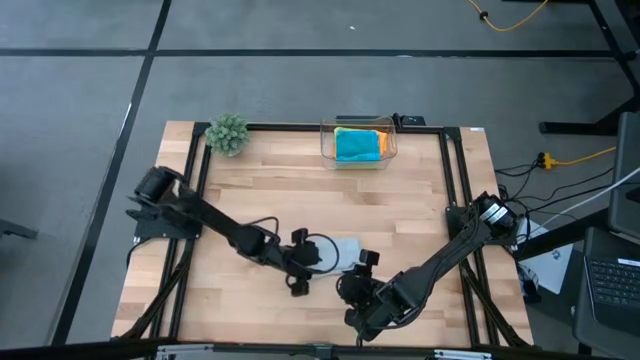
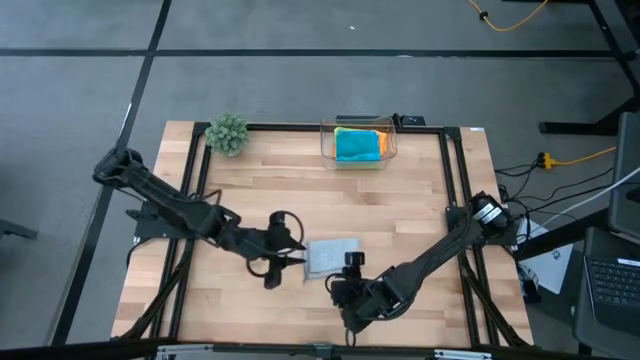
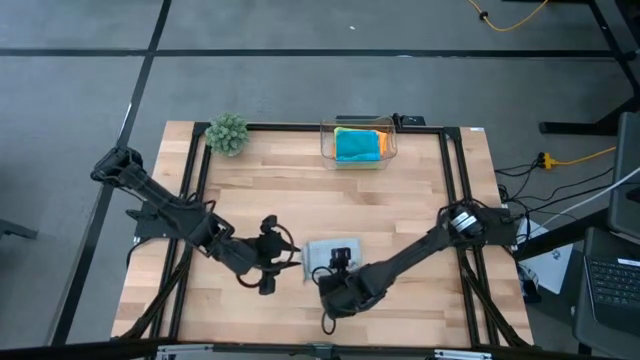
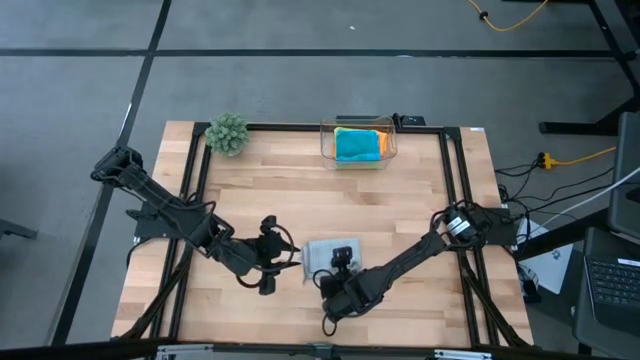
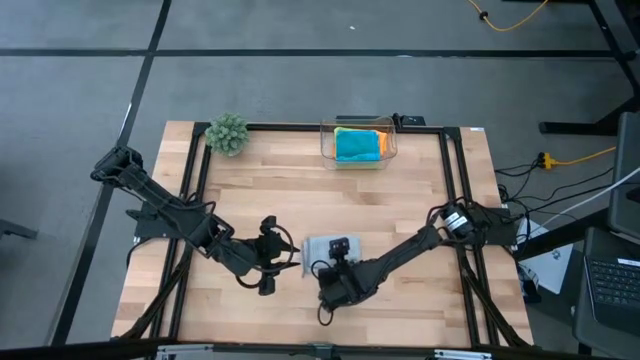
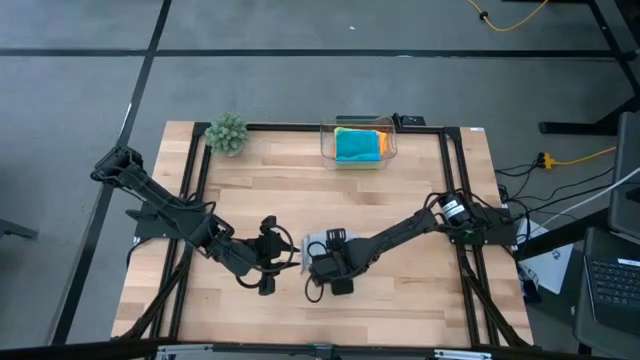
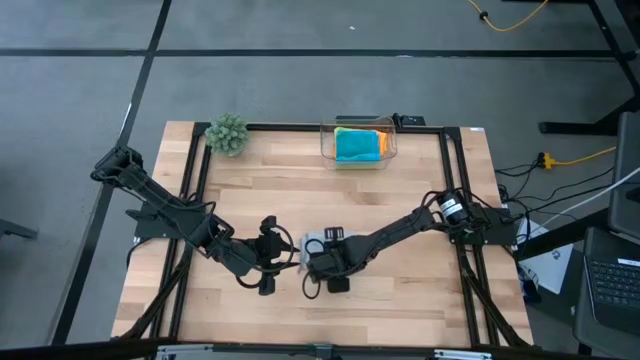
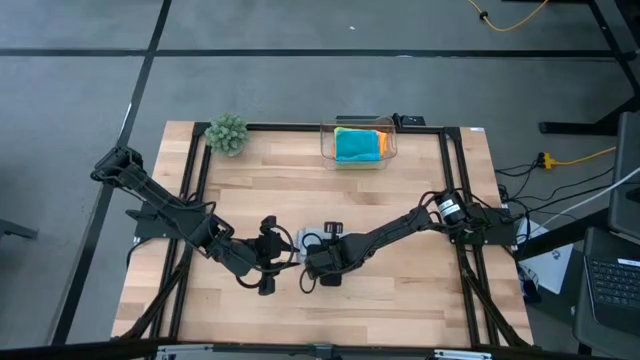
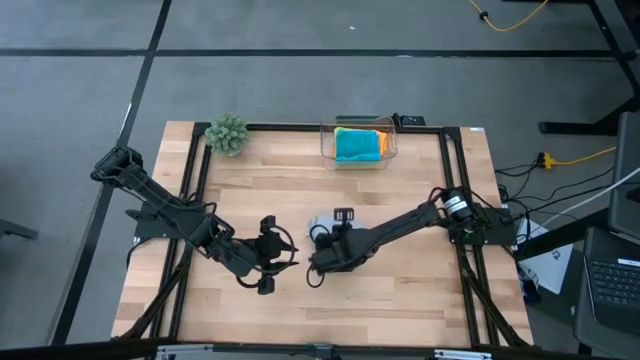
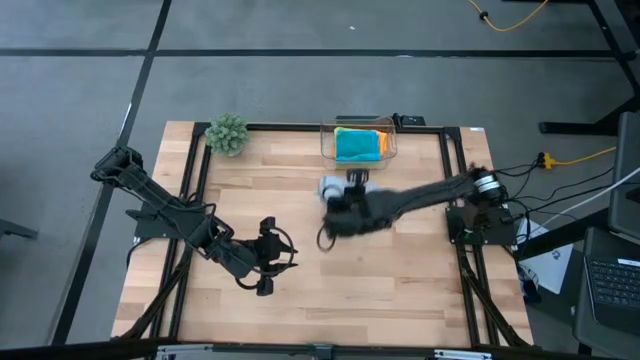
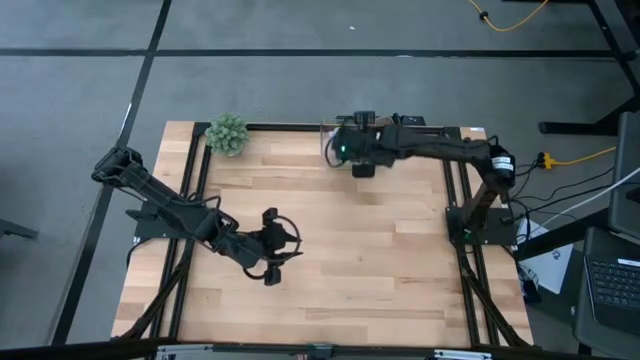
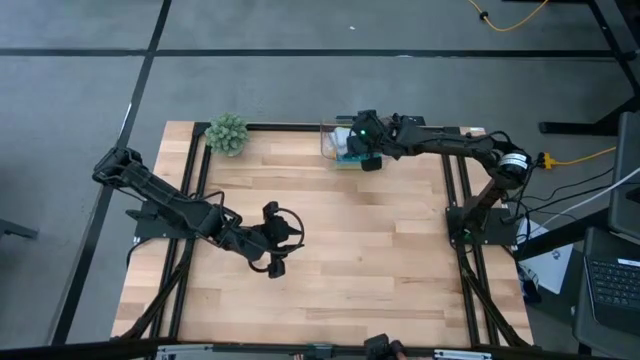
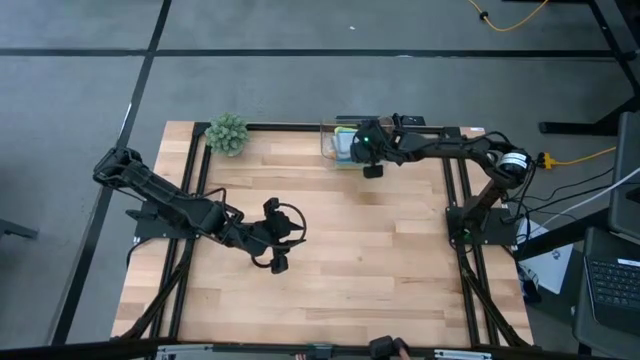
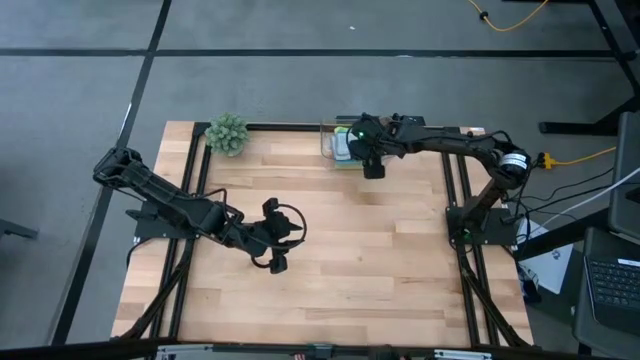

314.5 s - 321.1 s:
Task: Fold microfiber towels
Put the gray microfiber cloth into the transparent bin

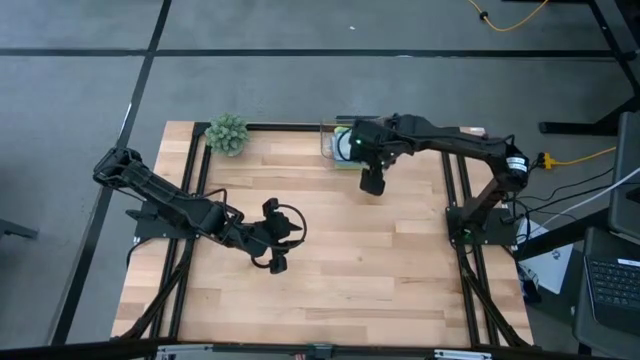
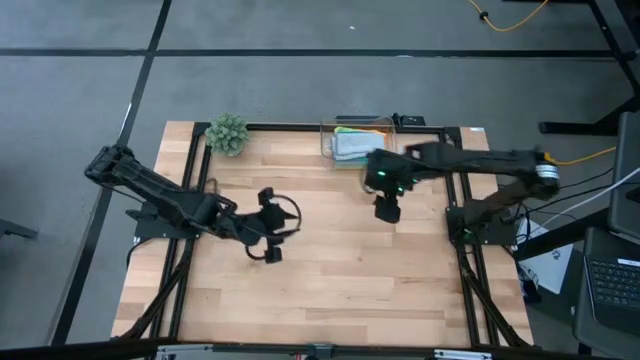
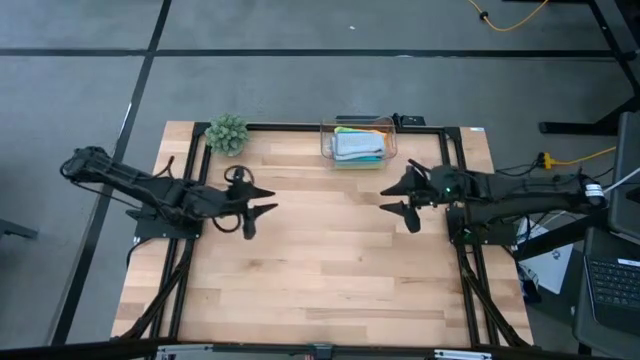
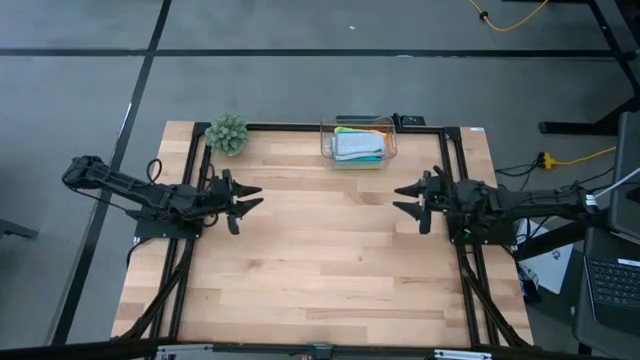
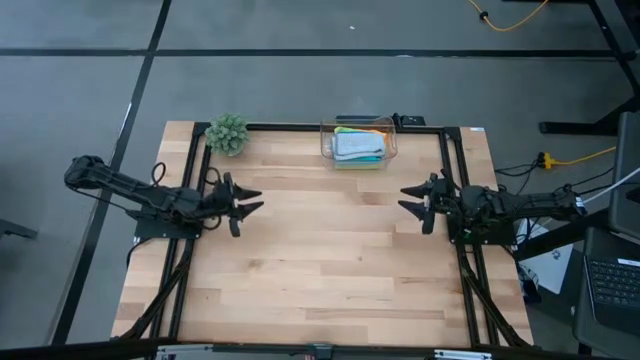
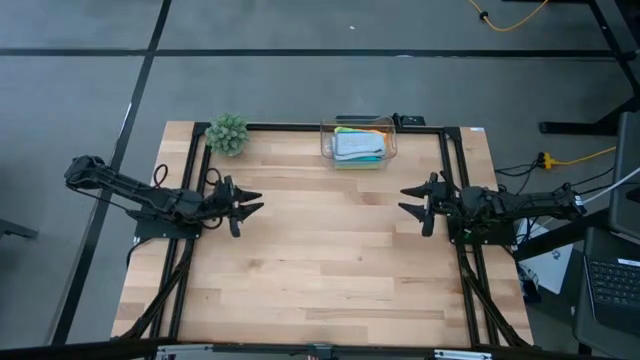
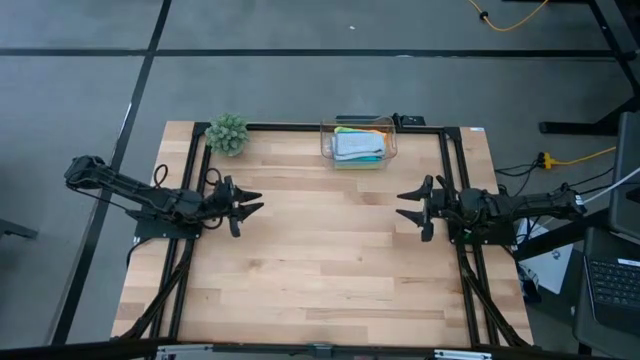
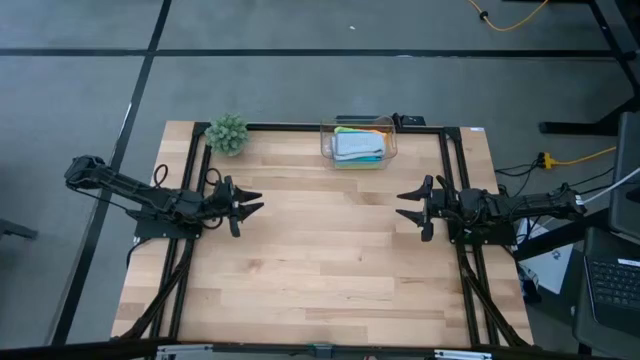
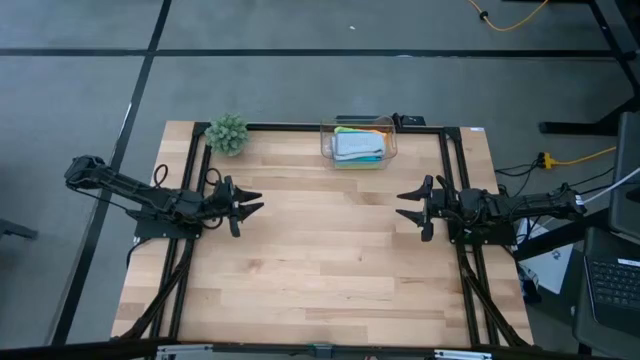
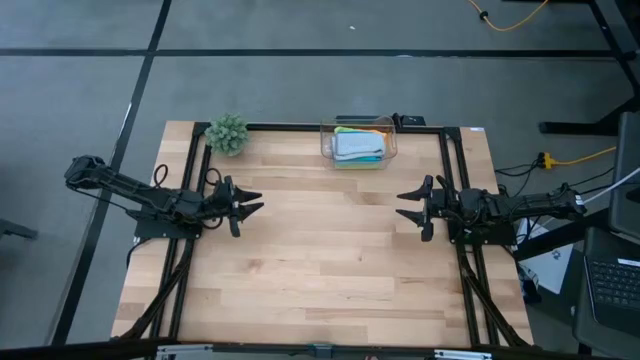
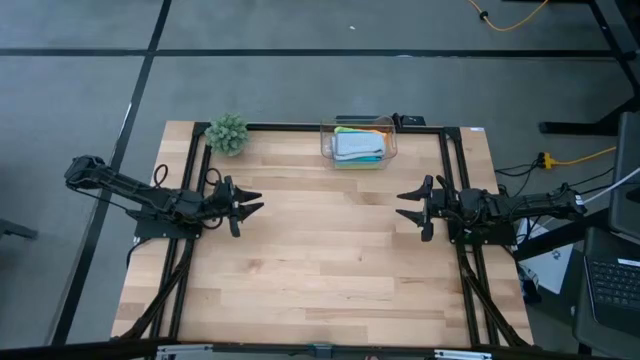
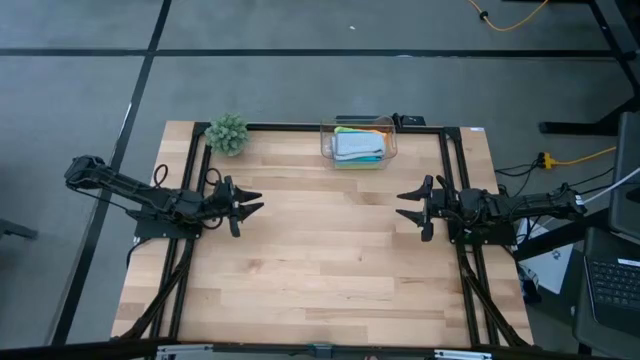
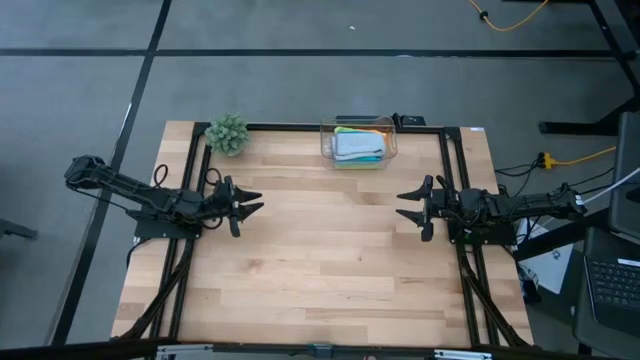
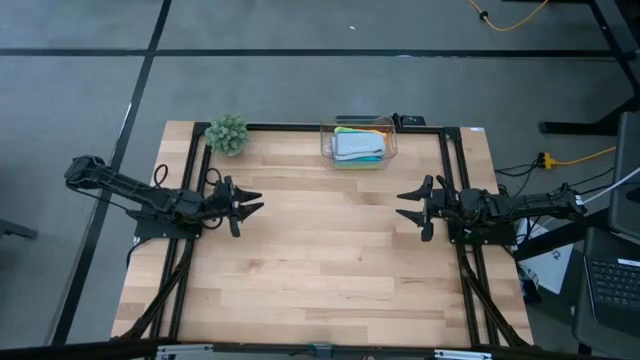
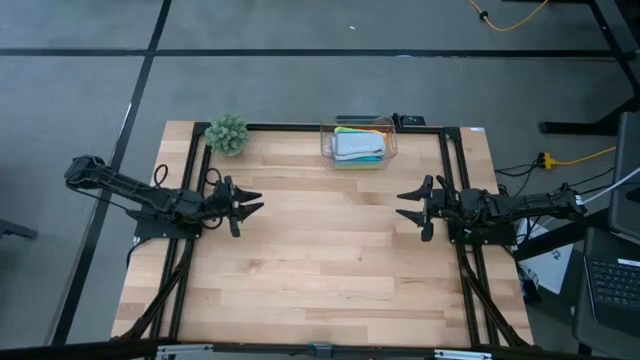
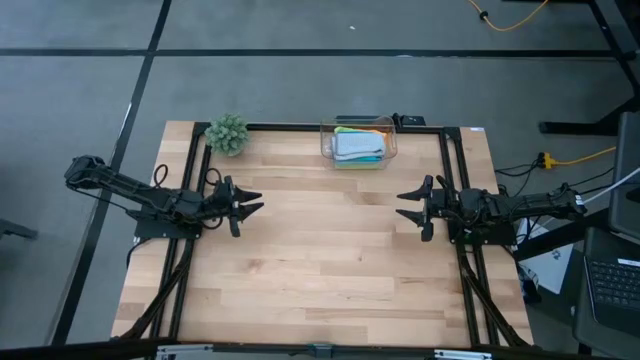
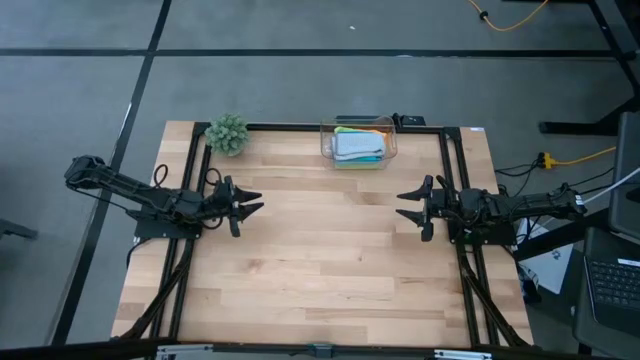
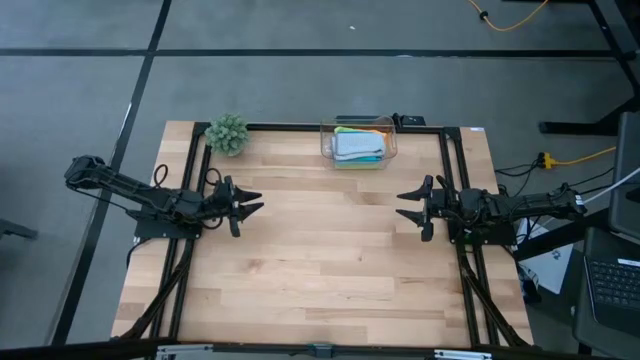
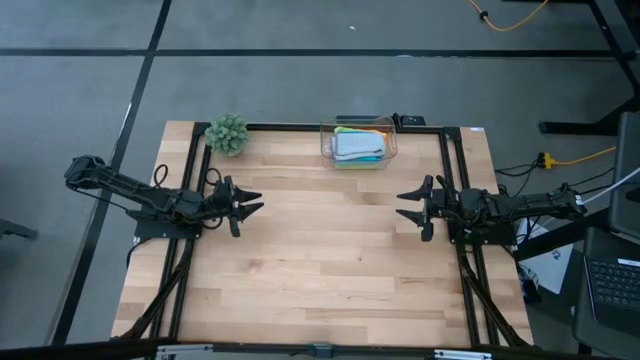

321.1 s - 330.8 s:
Return to Home Position

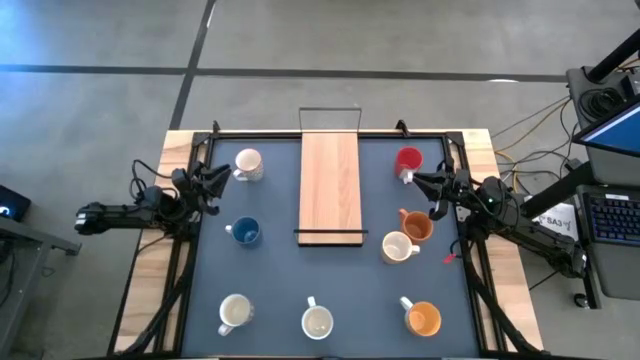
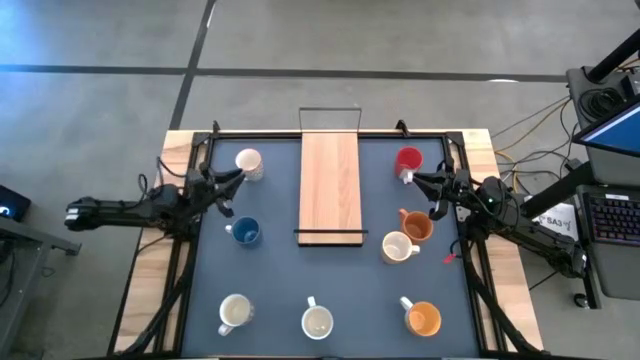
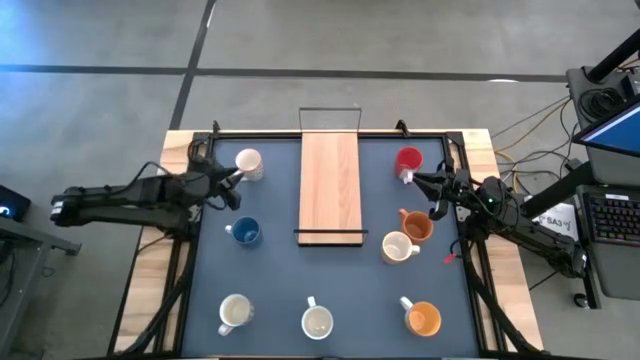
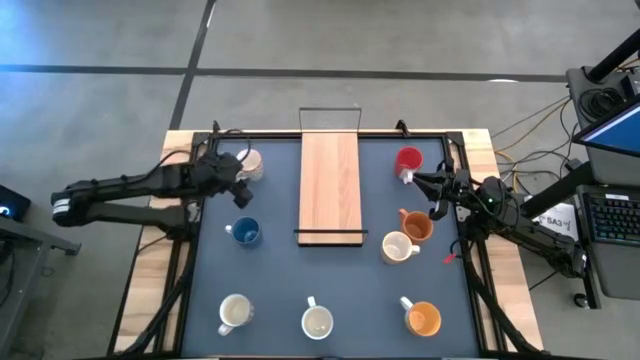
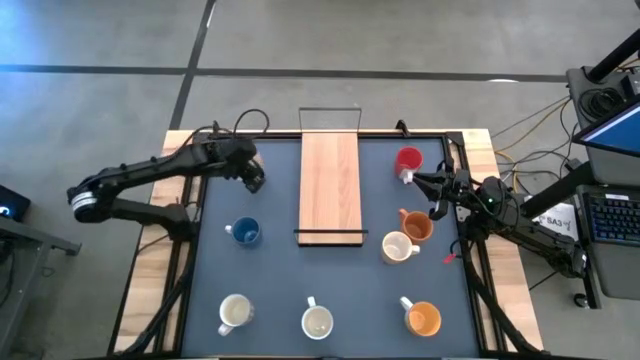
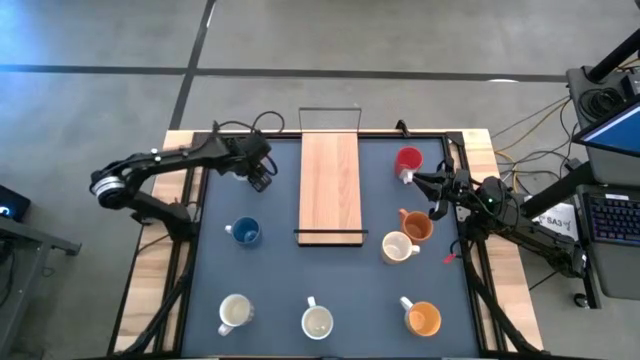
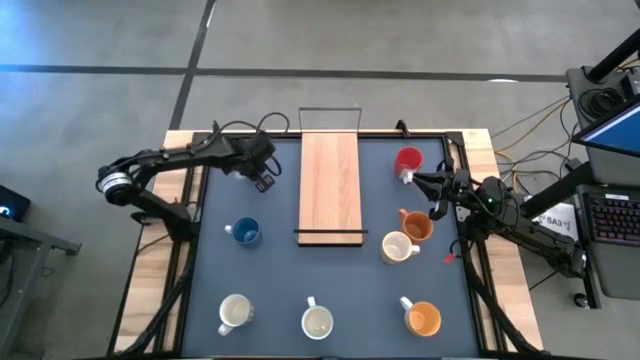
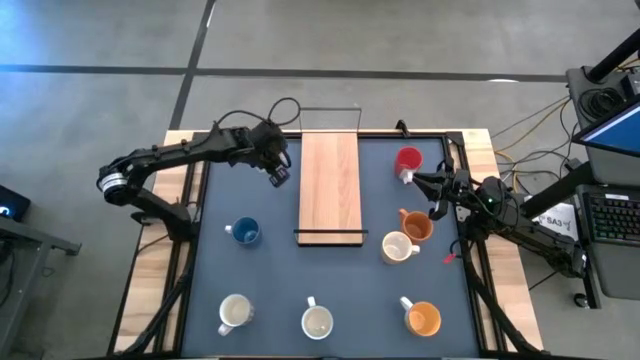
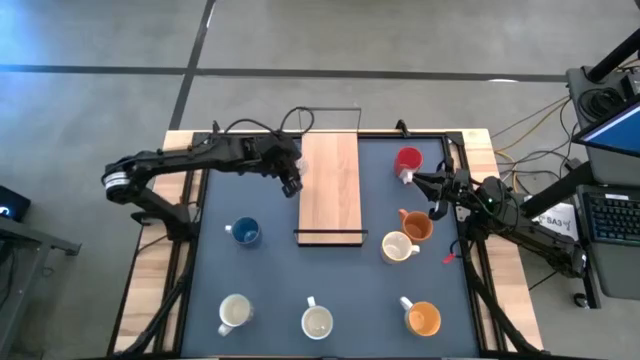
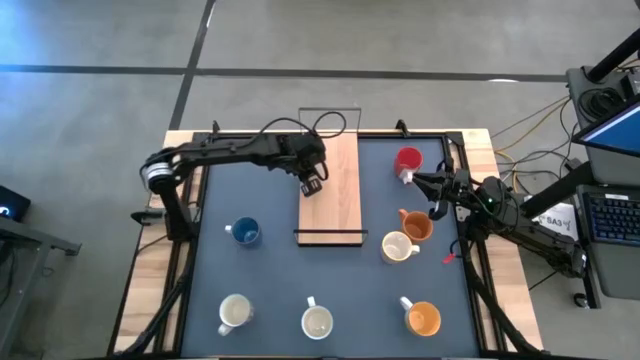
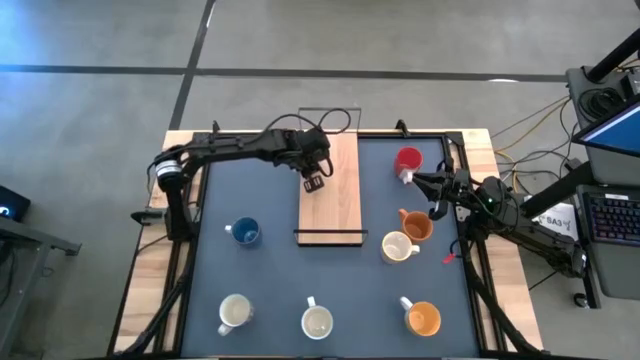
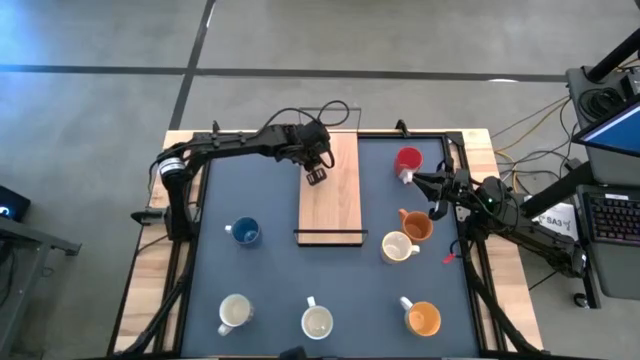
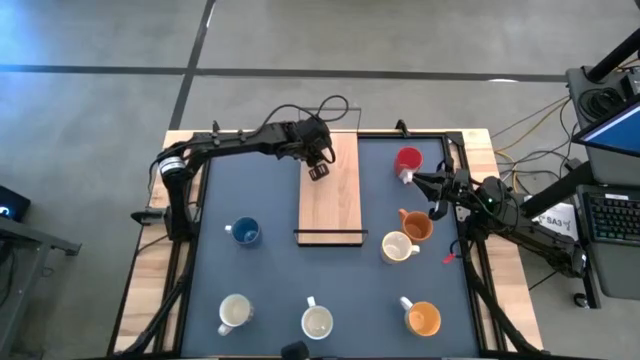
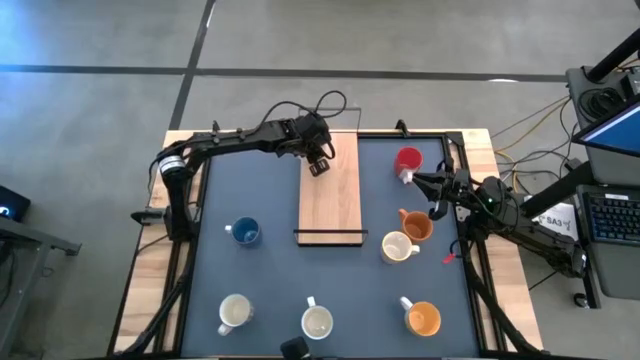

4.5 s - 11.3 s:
Task: Place coffee mugs
Put the gray mug on the shelf
